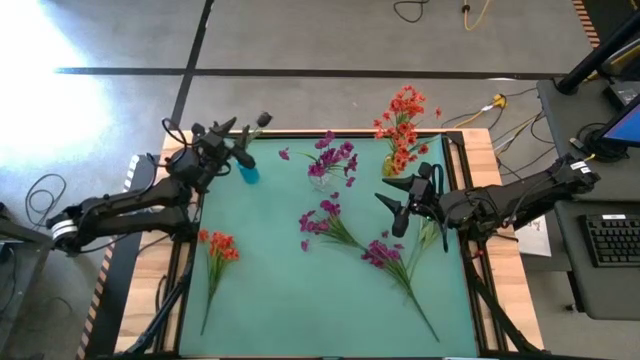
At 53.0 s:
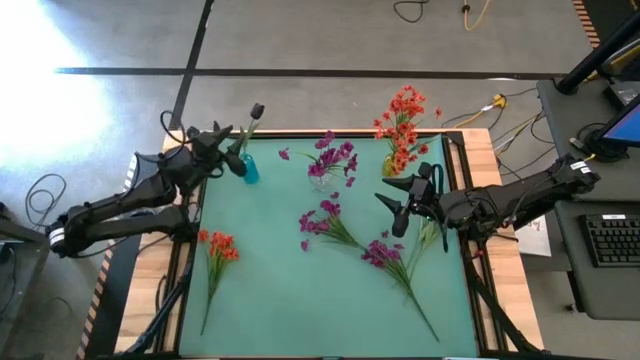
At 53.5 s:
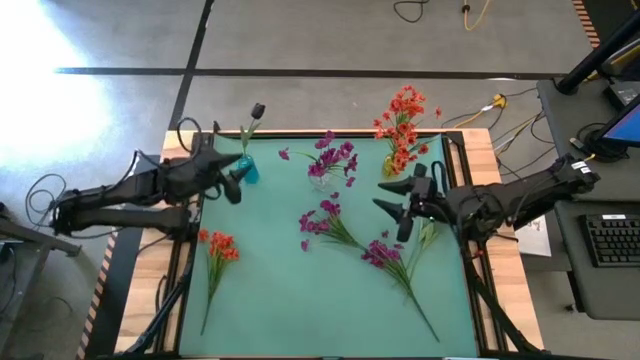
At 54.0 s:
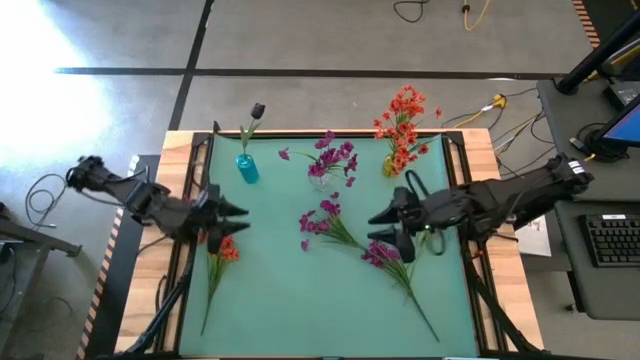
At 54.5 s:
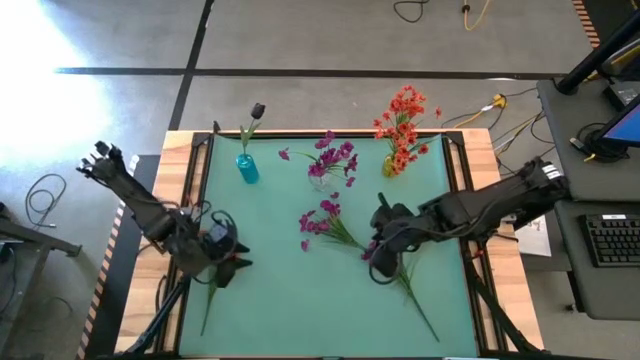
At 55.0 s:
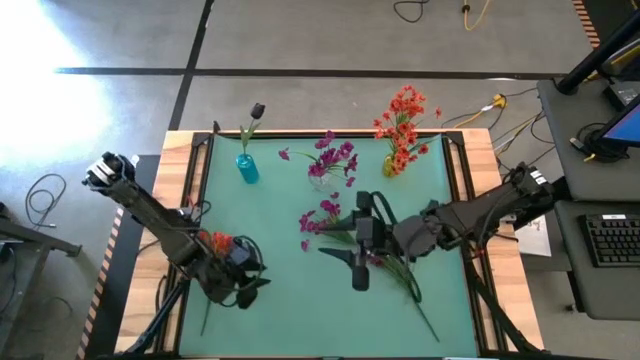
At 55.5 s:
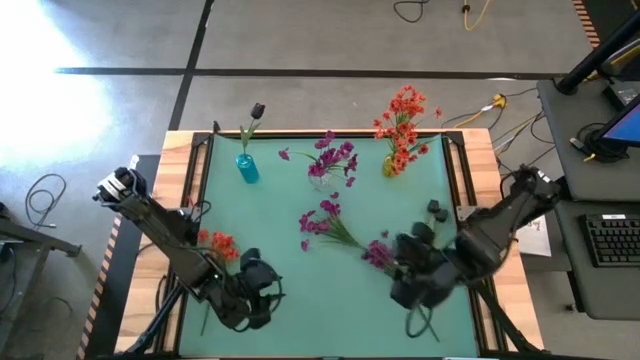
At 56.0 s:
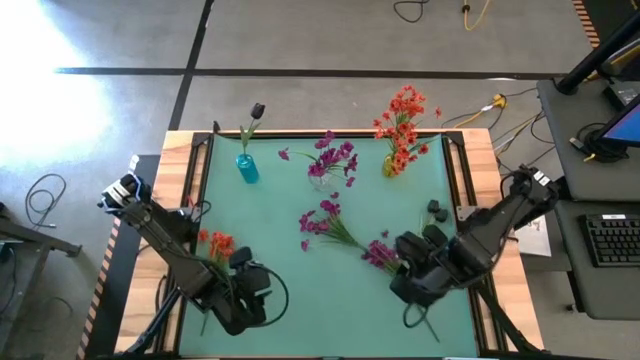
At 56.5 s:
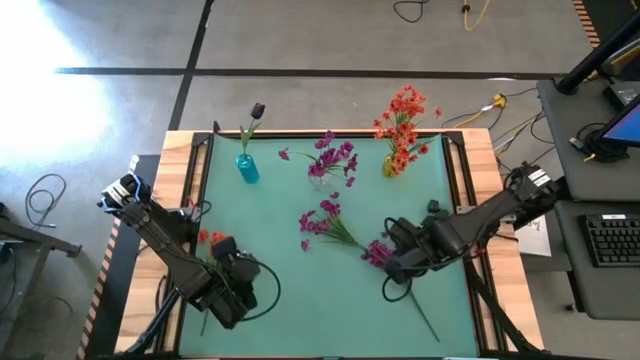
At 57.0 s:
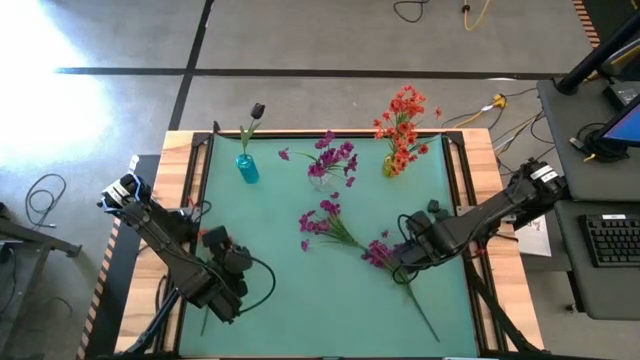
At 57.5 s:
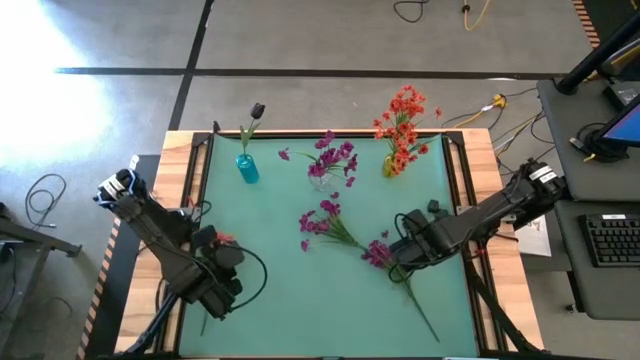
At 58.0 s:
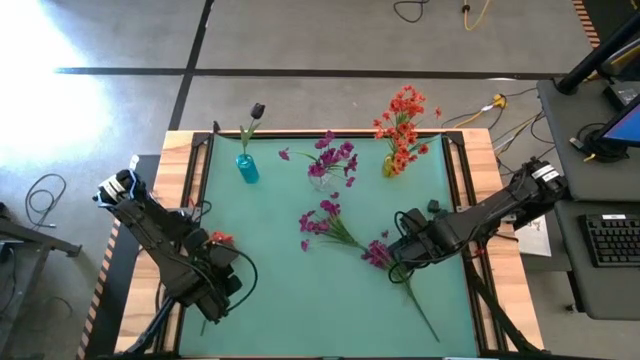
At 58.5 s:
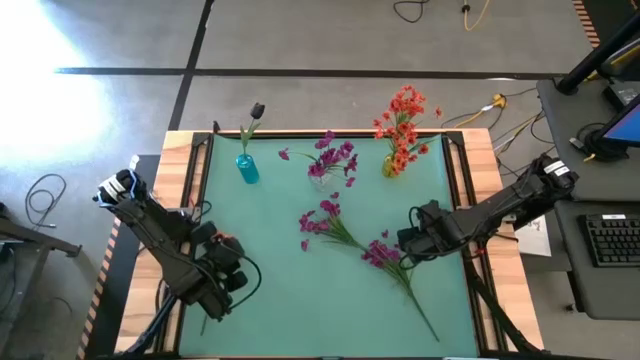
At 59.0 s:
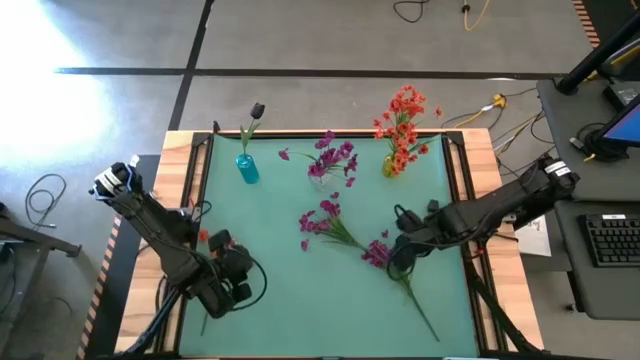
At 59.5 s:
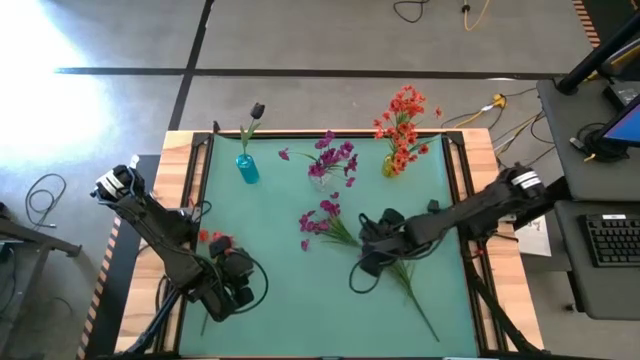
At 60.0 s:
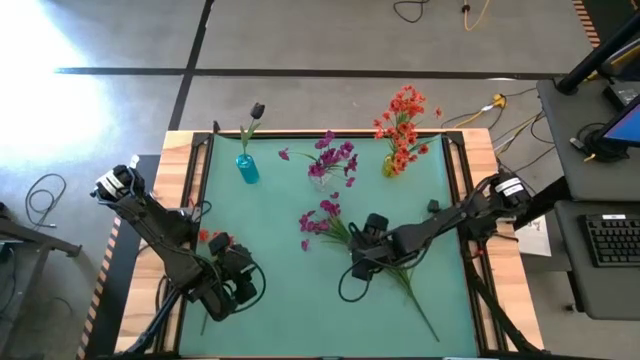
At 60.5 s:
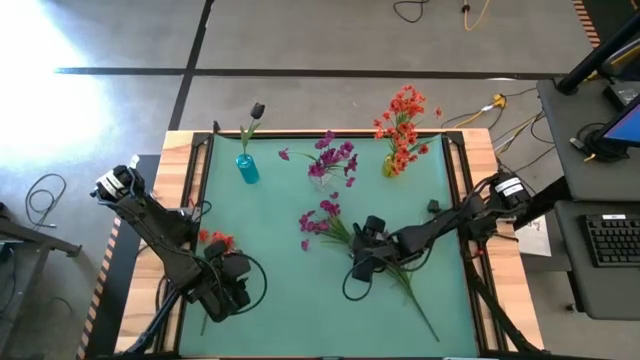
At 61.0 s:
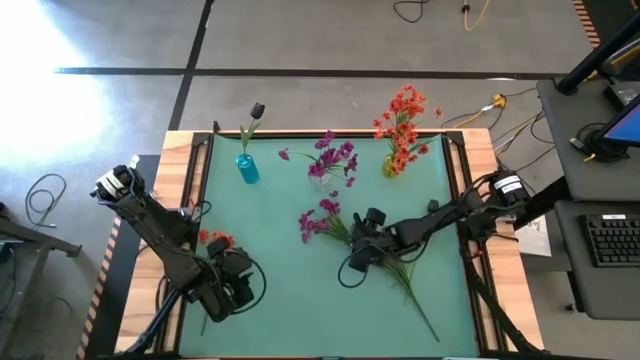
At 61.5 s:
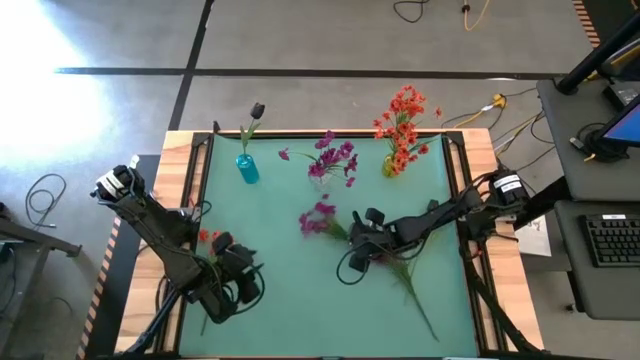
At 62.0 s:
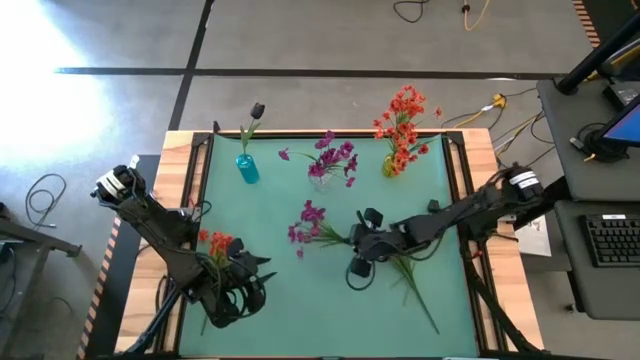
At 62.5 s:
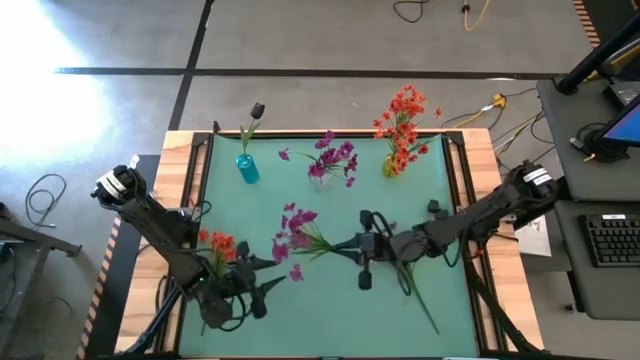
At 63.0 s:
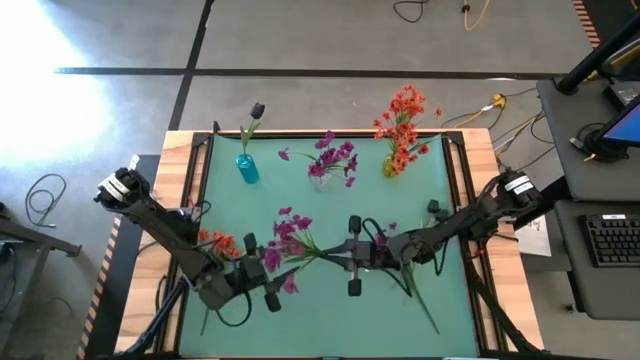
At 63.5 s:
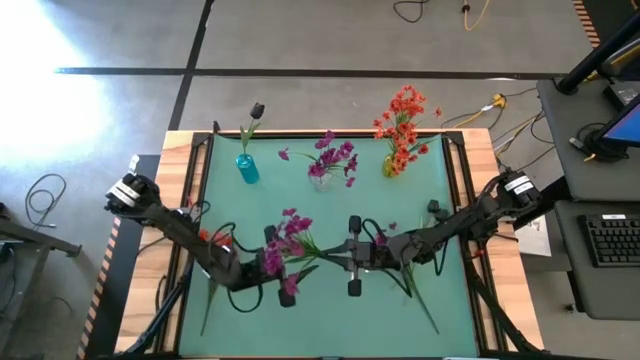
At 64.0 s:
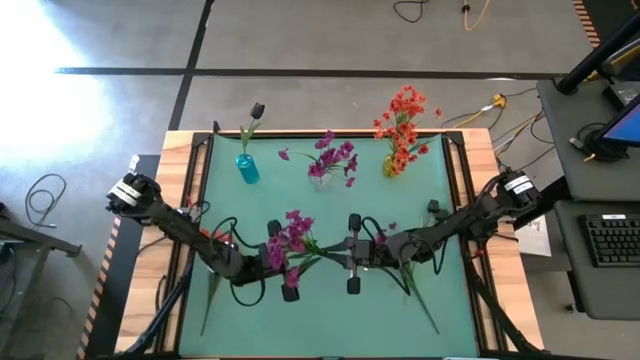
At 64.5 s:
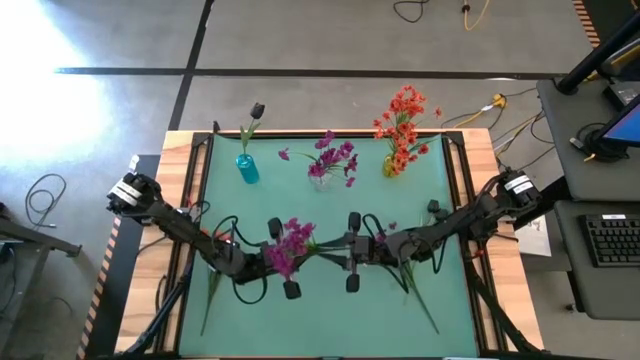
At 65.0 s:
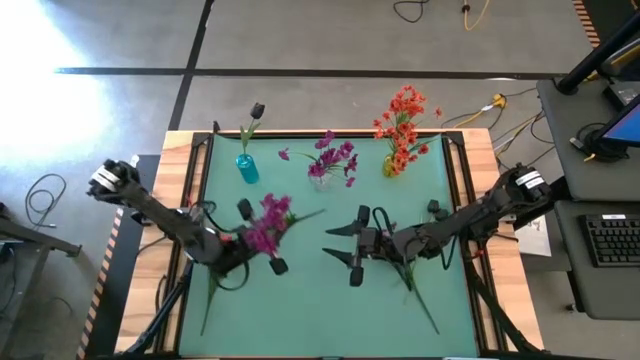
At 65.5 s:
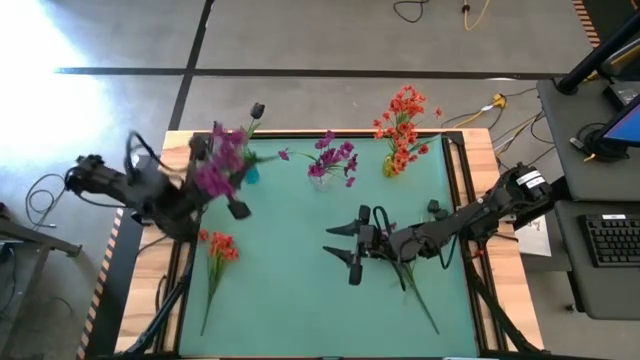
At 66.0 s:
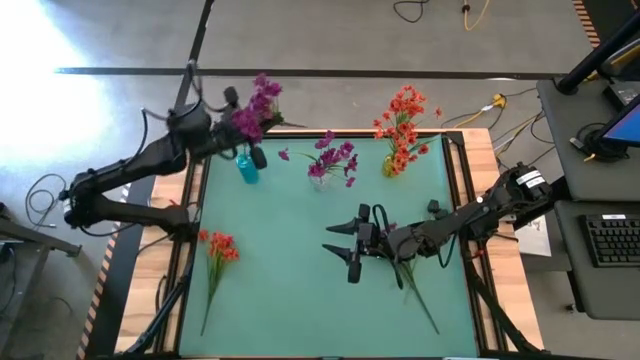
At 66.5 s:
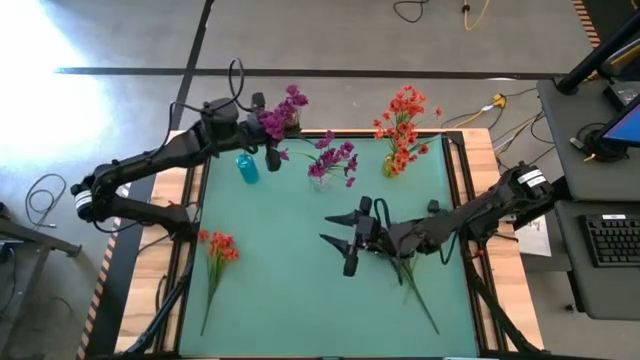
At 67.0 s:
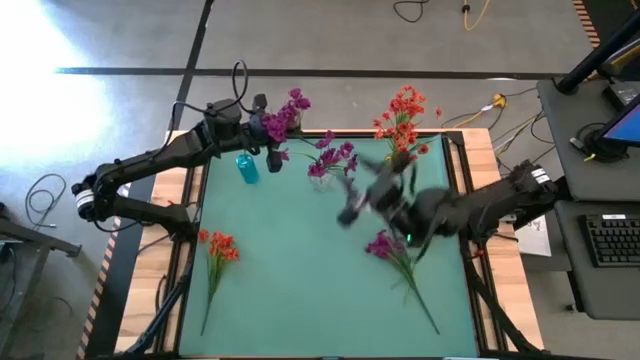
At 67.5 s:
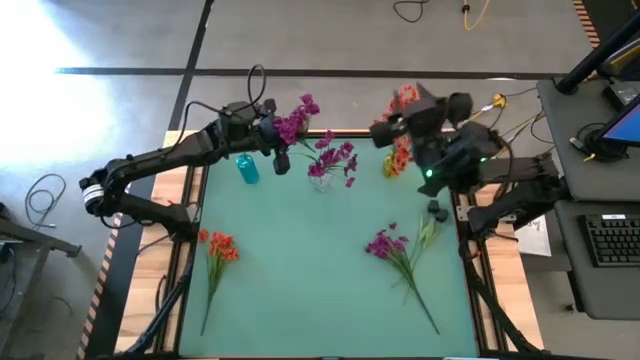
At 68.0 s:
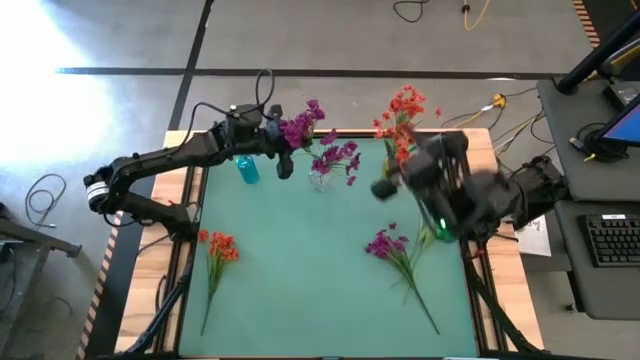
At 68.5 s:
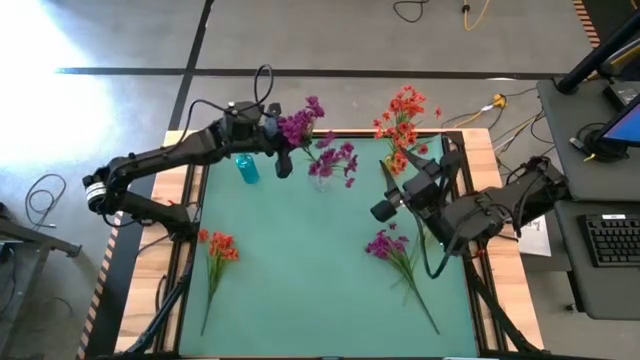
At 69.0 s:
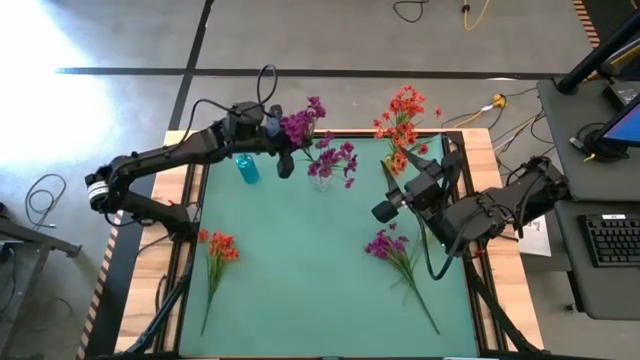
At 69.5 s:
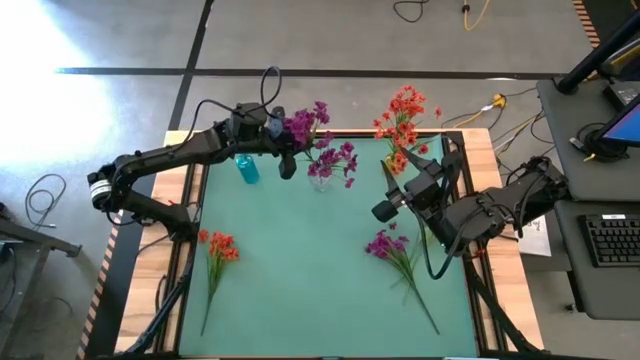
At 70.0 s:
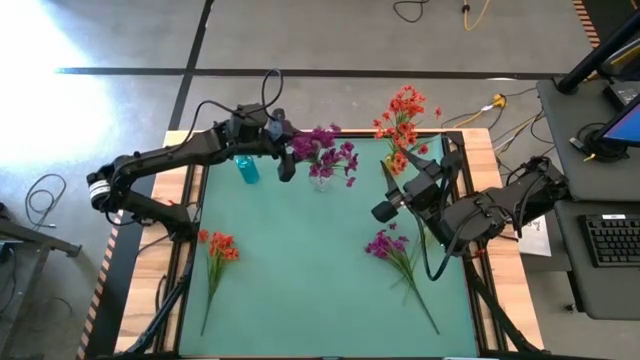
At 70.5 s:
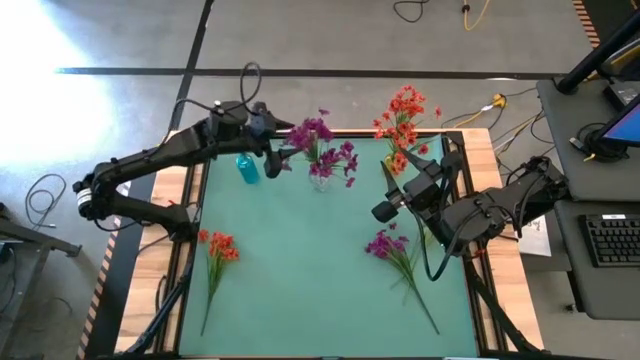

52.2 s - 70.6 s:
Task: Sort flowers into vase by color
Put the top violet flowers into the transparent flower vase

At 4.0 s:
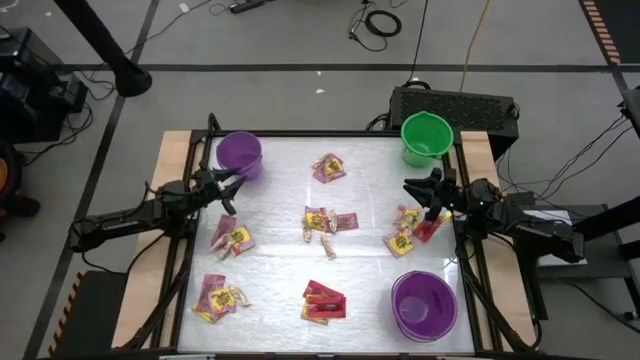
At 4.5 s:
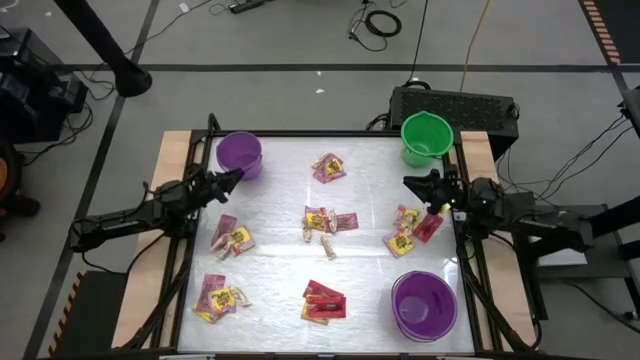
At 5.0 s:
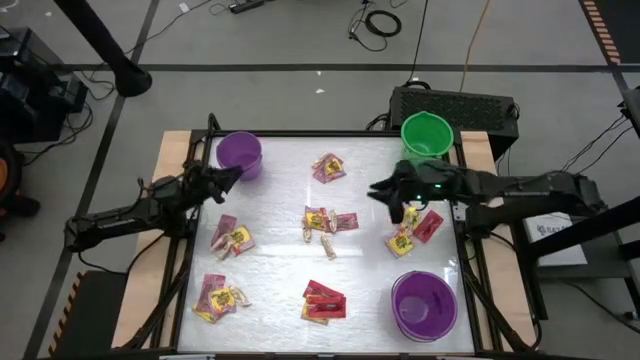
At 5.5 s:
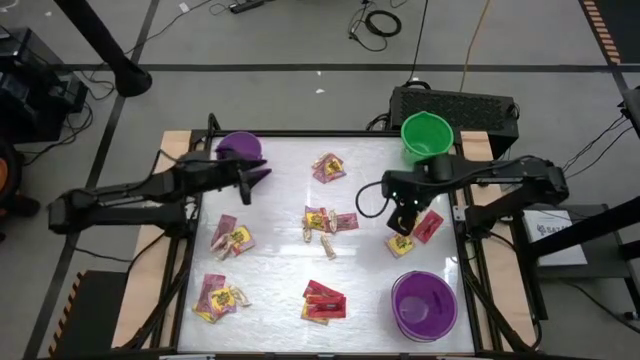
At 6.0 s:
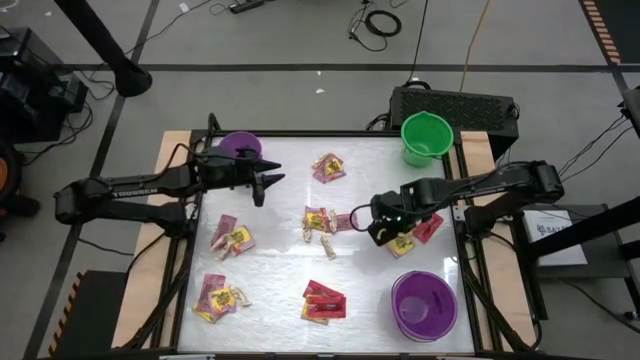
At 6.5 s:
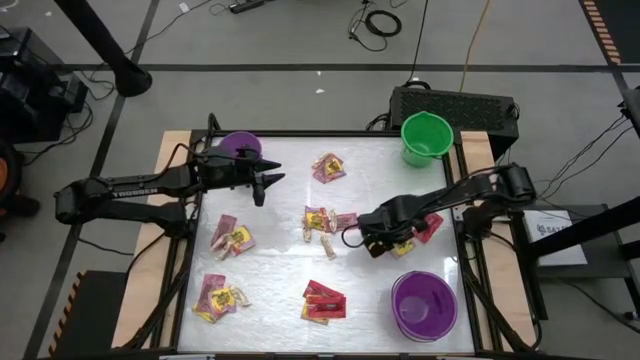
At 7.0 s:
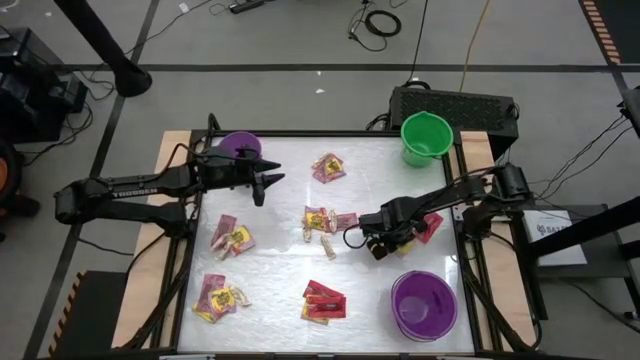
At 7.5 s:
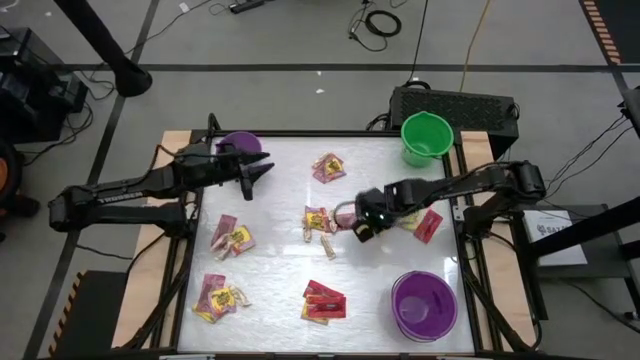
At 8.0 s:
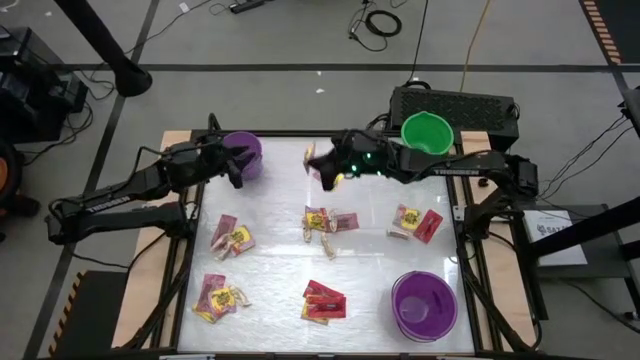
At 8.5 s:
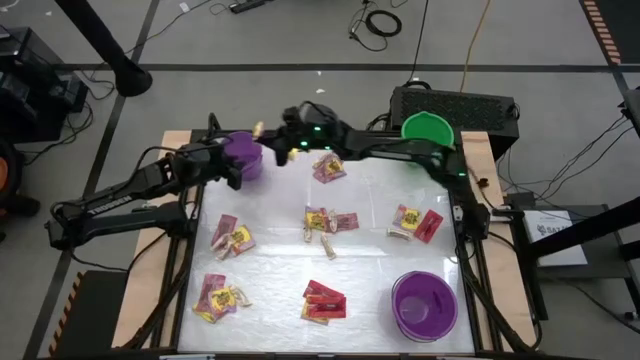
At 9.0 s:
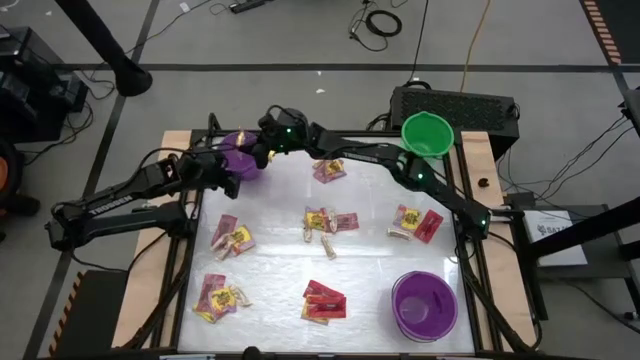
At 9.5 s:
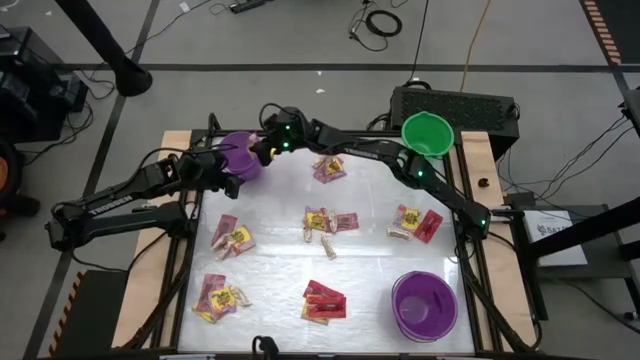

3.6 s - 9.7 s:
Task: Sort candy by brand, put in halloween buckets
Put the yellow candy into the top violet bucket
